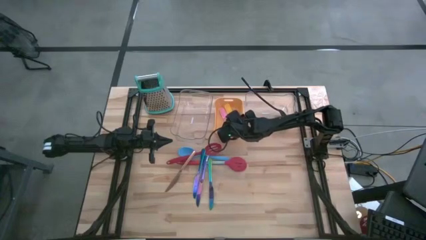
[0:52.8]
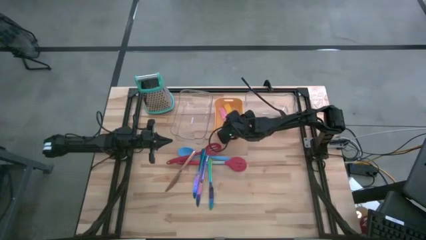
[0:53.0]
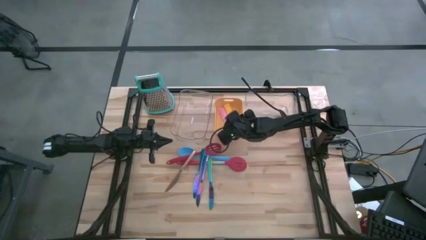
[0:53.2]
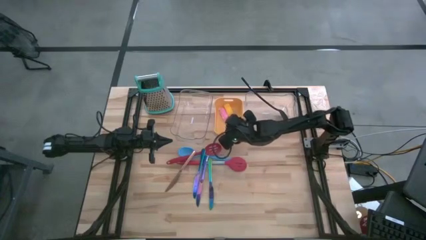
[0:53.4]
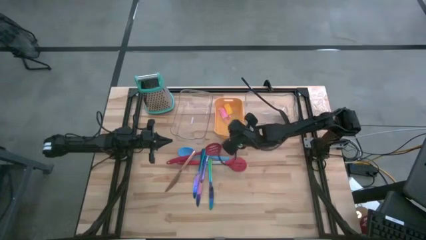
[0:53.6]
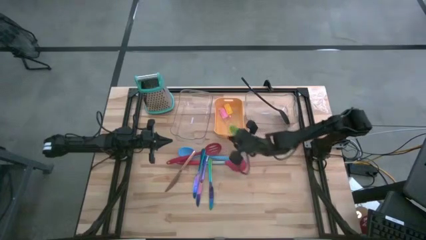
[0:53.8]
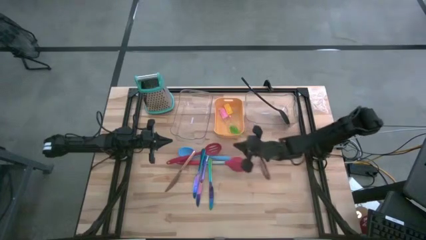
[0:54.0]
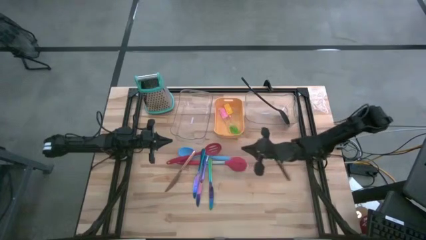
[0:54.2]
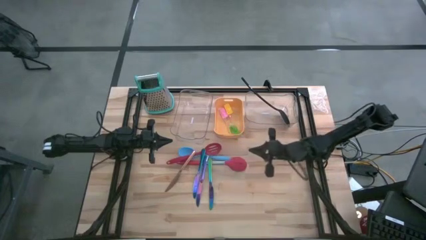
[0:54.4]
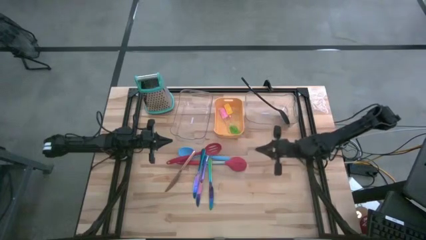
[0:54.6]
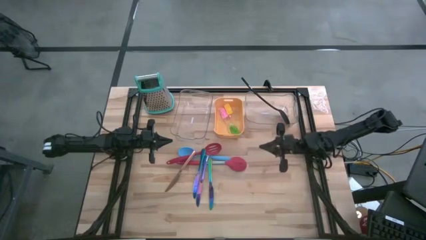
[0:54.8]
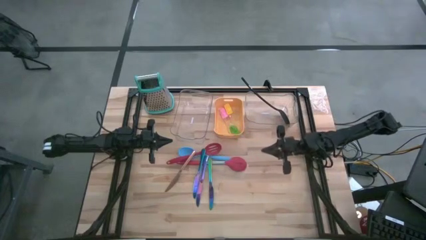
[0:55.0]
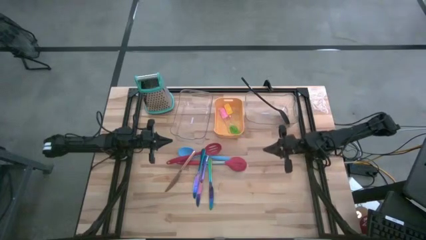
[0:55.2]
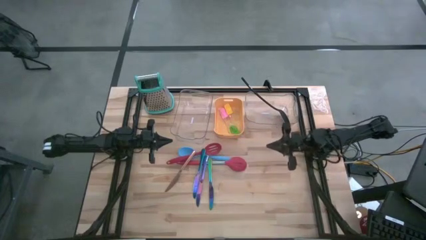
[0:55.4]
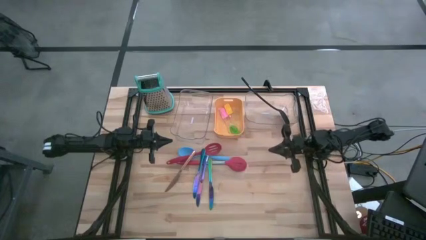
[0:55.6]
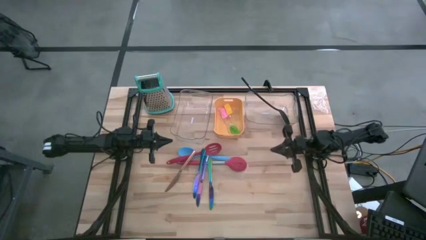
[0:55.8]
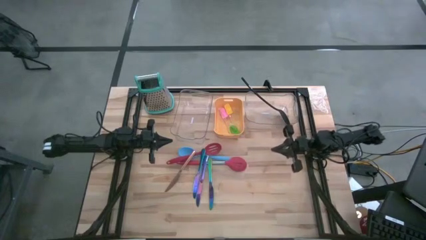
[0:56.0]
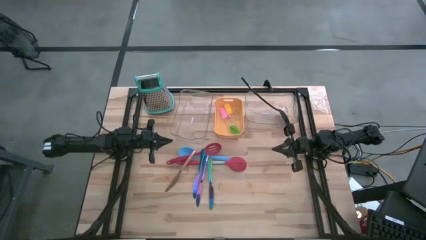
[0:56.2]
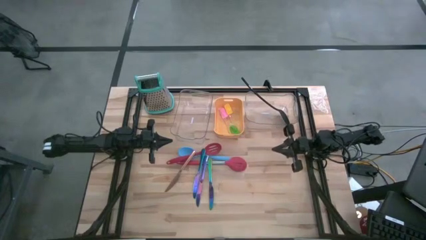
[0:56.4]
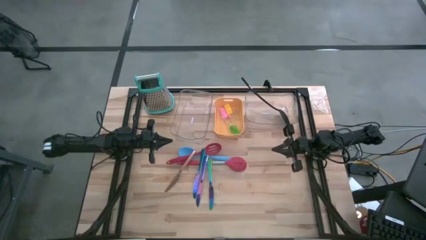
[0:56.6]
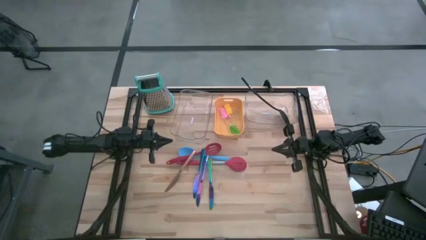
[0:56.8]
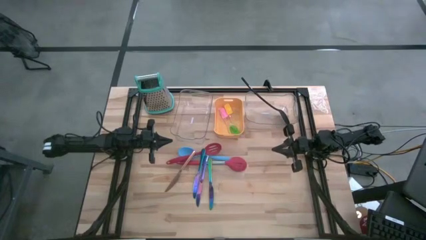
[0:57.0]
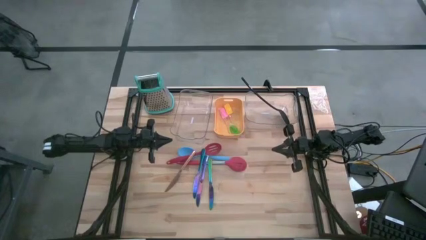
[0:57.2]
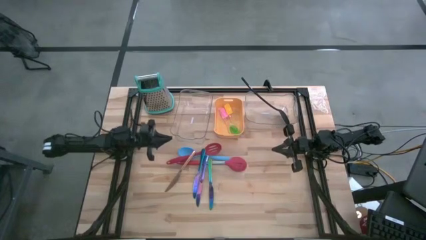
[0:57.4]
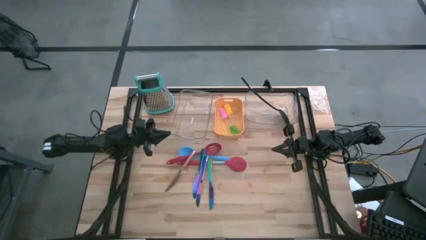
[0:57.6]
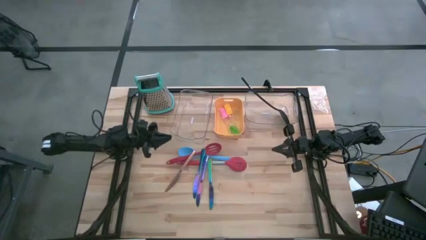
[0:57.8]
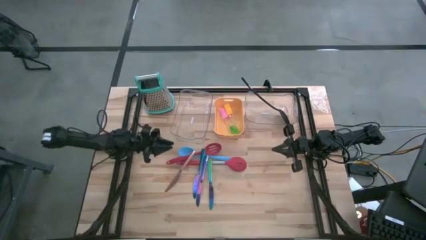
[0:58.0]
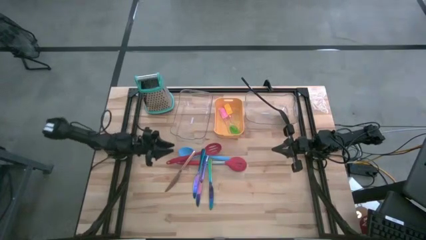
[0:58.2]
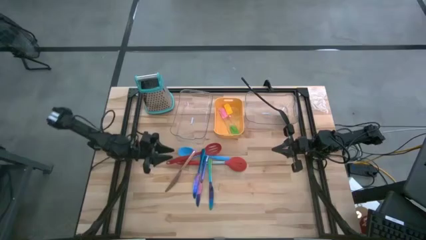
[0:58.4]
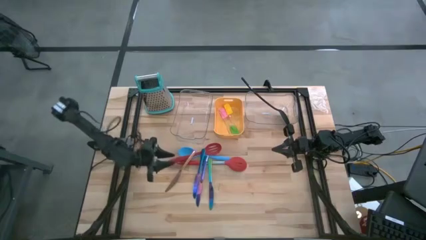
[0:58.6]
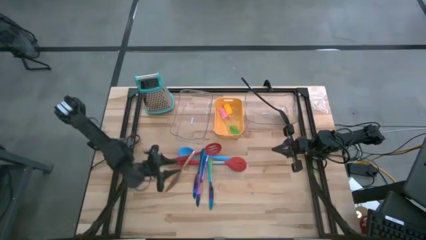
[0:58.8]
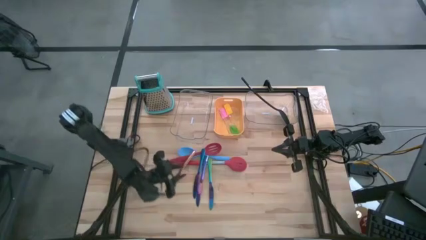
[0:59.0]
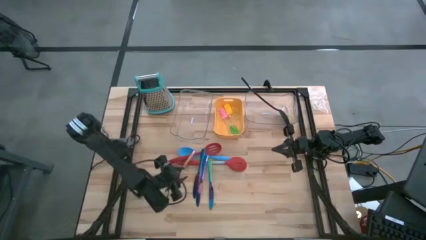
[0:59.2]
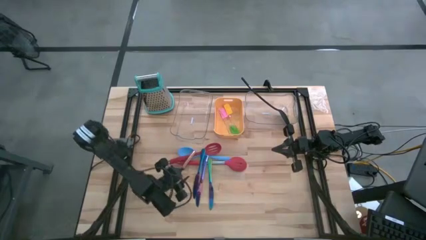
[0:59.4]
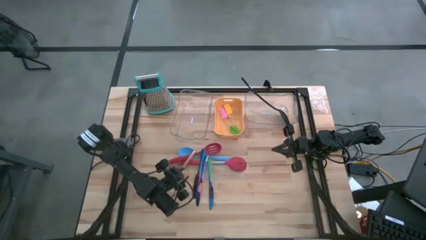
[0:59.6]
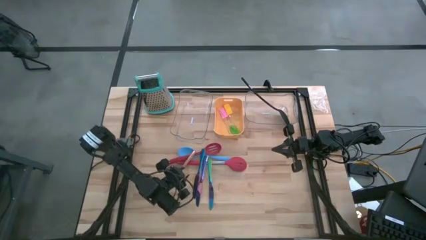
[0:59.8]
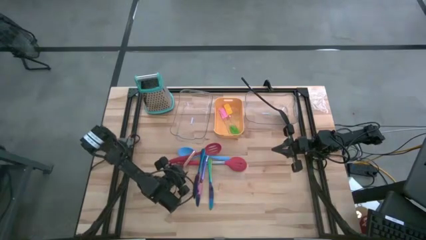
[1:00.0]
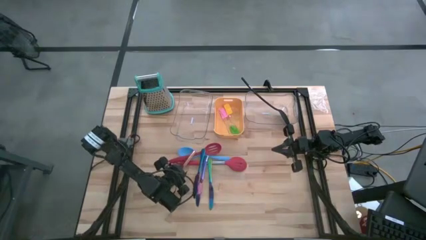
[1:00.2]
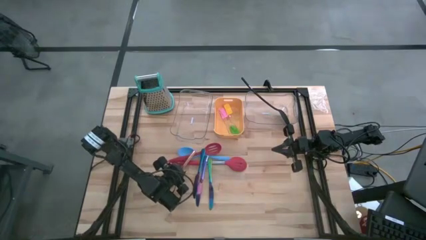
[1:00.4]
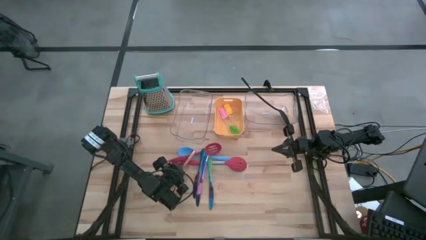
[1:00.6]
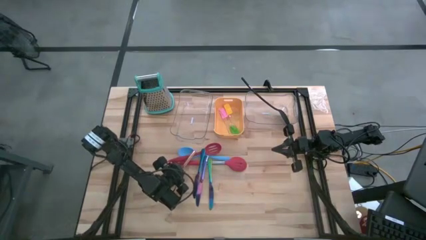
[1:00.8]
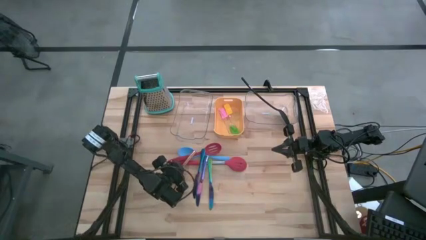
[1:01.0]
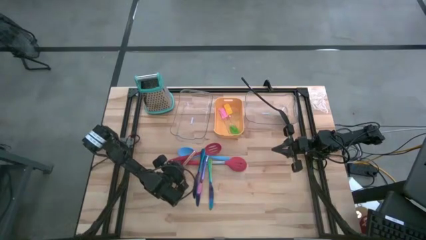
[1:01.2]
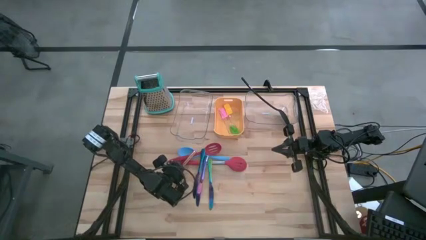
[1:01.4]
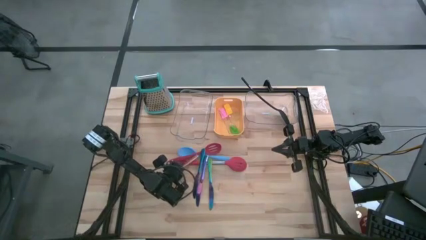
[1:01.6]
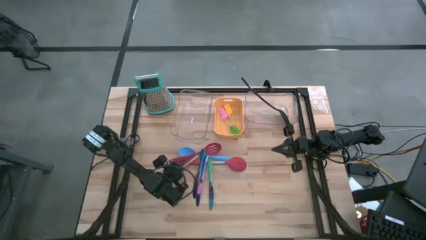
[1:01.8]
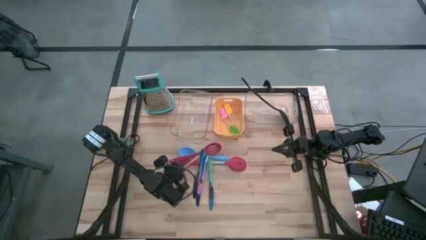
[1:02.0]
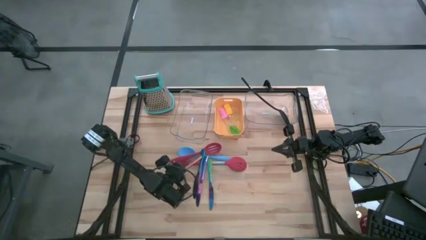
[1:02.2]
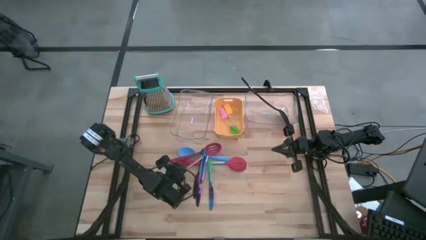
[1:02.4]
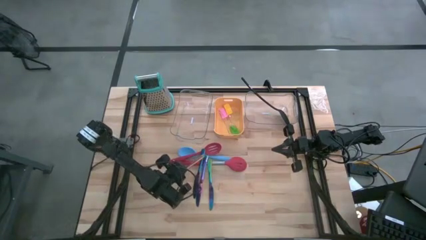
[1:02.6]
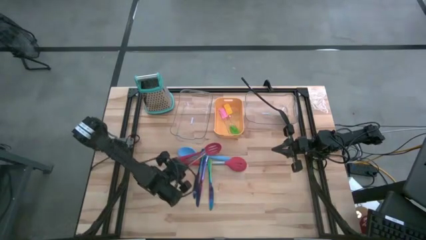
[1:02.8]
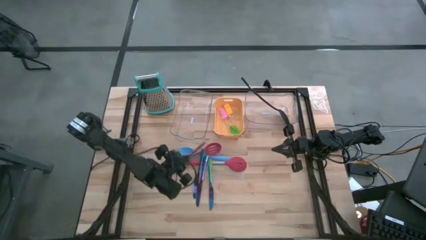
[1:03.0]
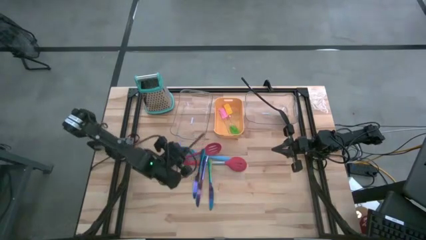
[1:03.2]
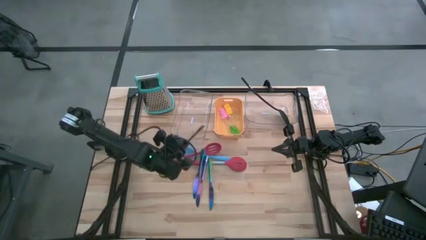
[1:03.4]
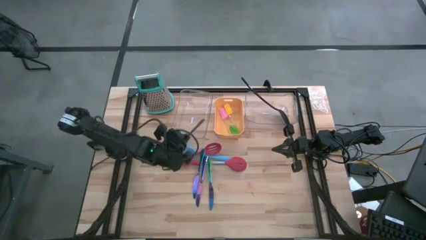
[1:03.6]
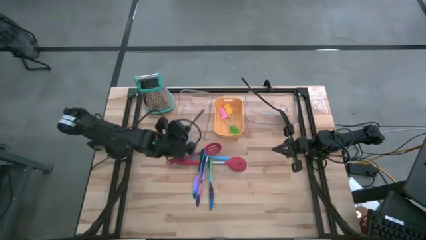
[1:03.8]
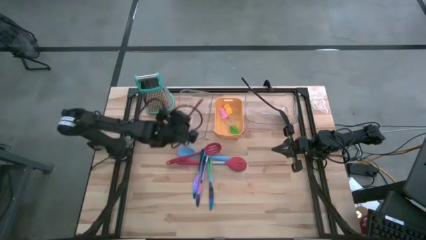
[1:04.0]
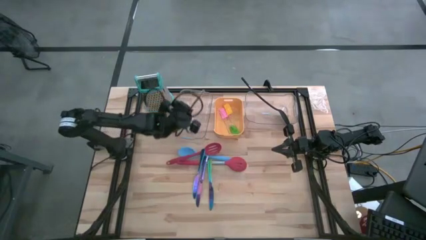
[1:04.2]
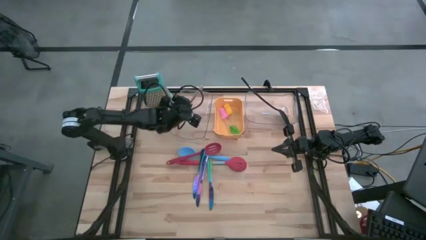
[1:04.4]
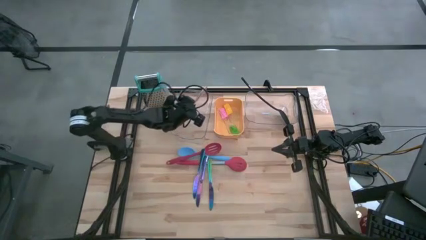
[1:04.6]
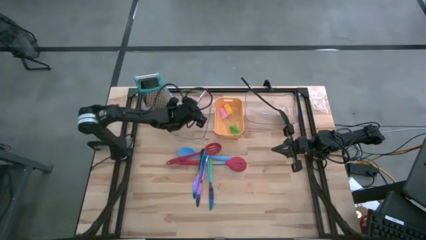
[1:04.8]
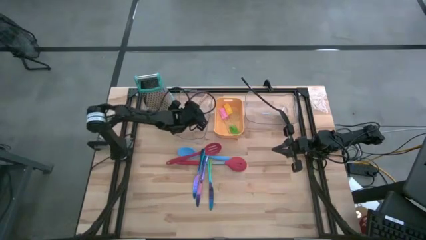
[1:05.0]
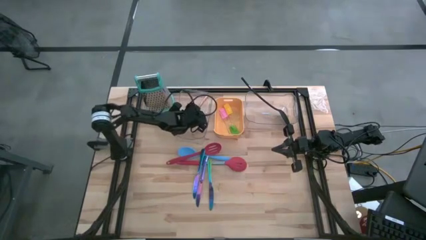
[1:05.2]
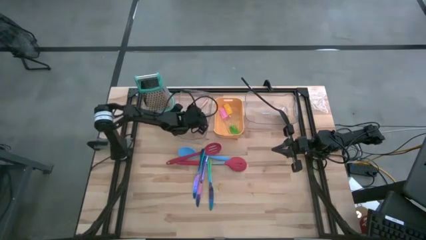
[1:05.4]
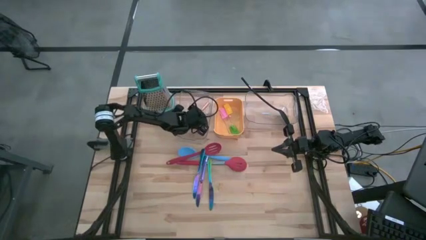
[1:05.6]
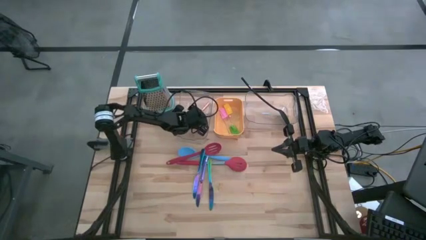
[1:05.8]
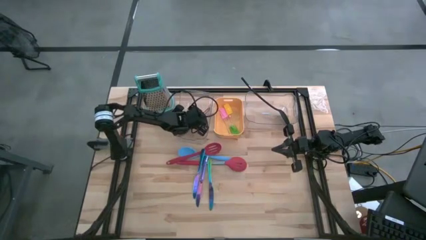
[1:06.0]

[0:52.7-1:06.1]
Task: Pick & Place Kitchen Items
Put the golden knife into the left transparent bin
